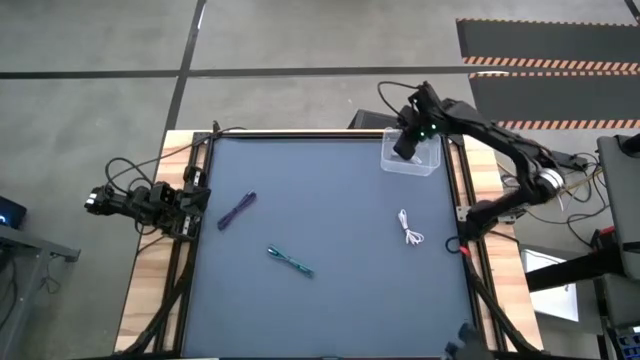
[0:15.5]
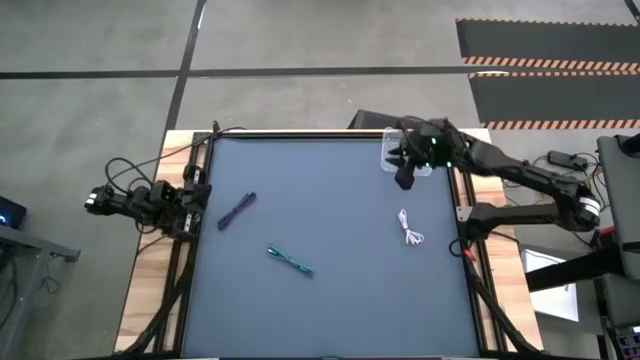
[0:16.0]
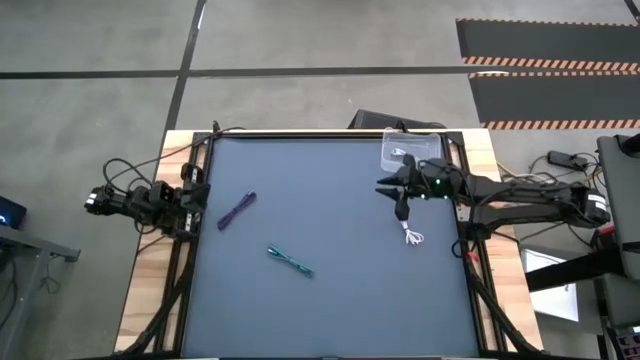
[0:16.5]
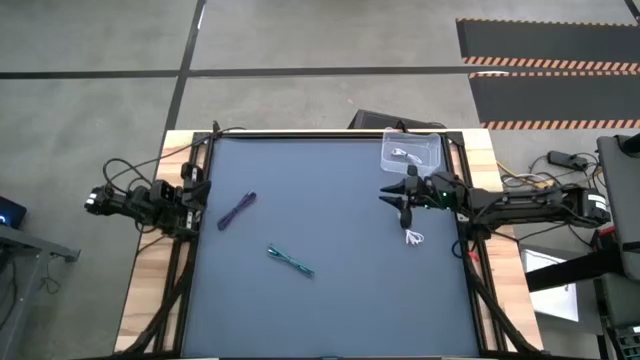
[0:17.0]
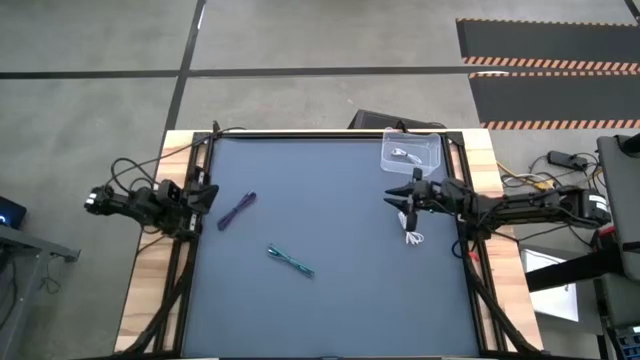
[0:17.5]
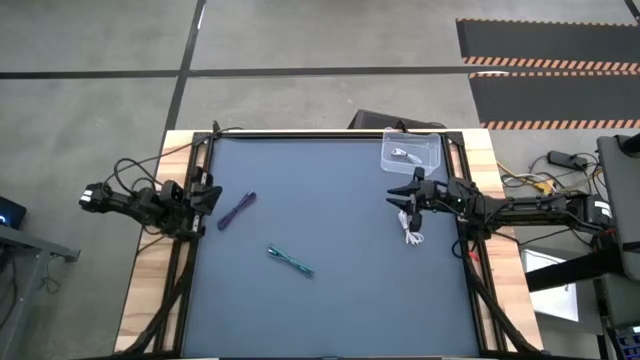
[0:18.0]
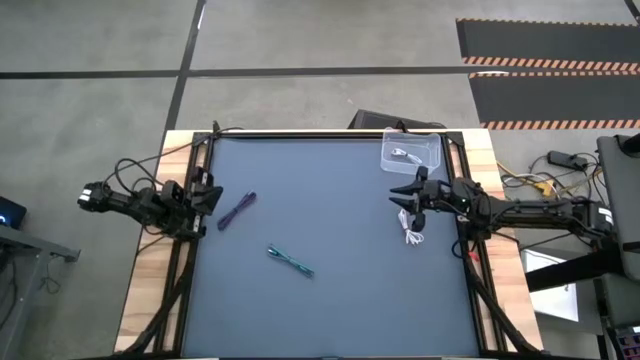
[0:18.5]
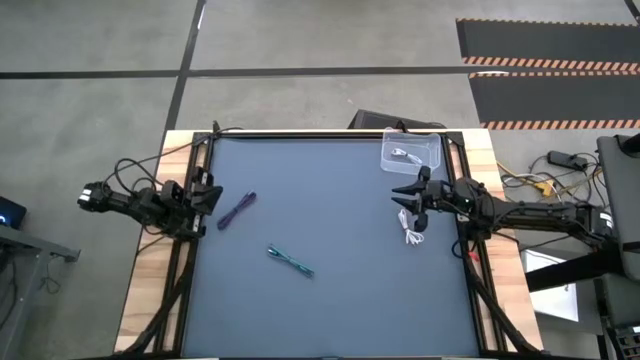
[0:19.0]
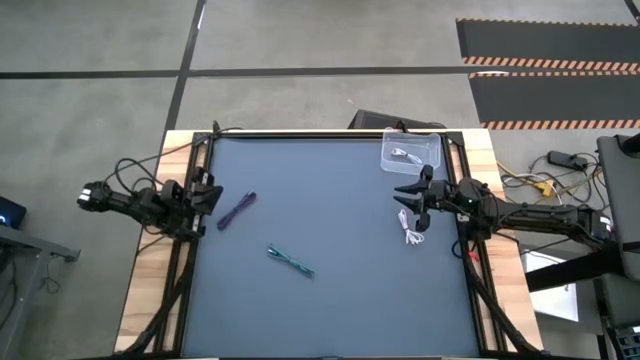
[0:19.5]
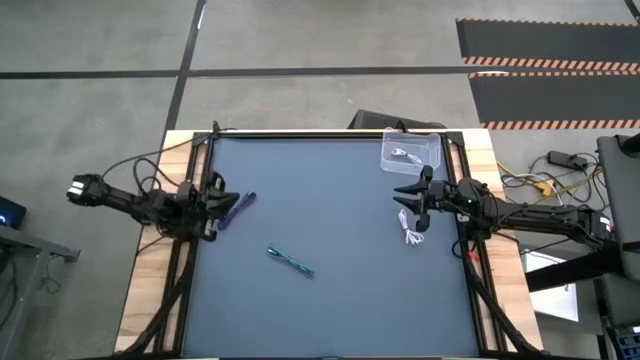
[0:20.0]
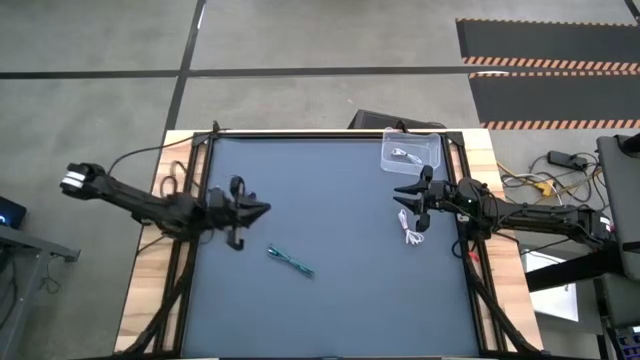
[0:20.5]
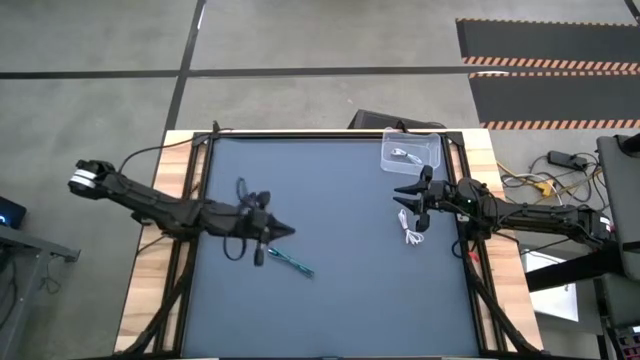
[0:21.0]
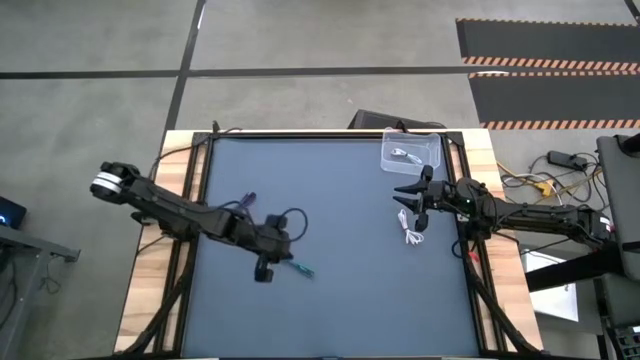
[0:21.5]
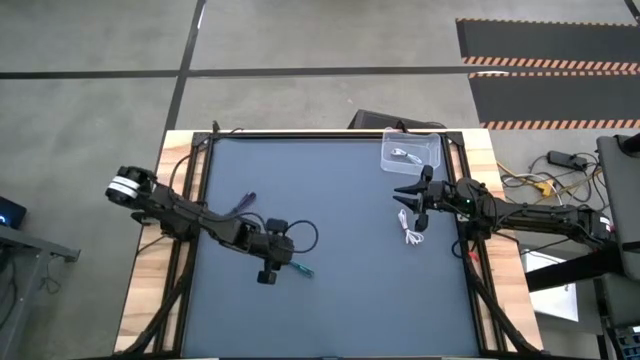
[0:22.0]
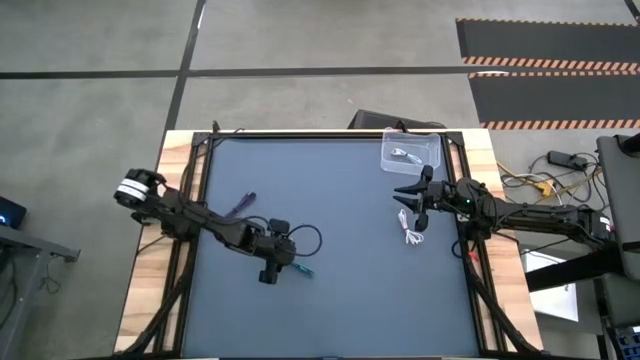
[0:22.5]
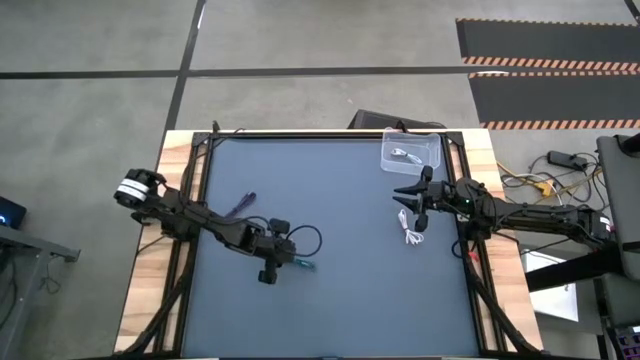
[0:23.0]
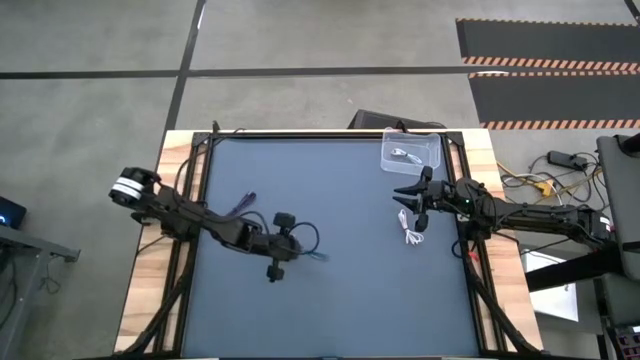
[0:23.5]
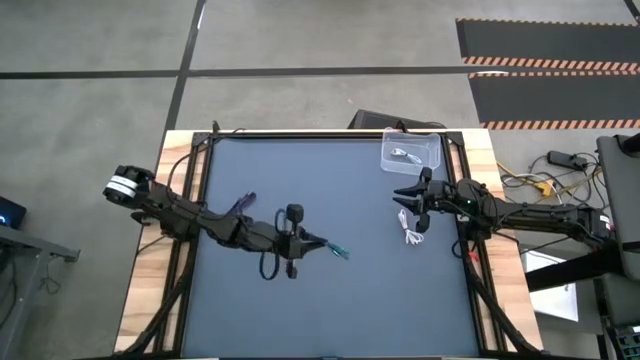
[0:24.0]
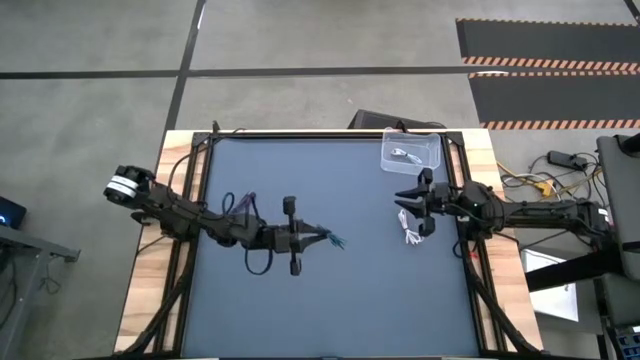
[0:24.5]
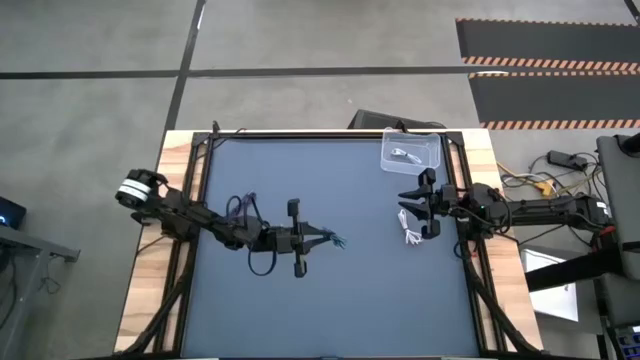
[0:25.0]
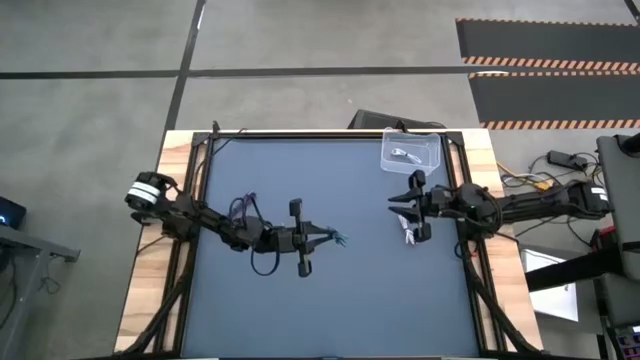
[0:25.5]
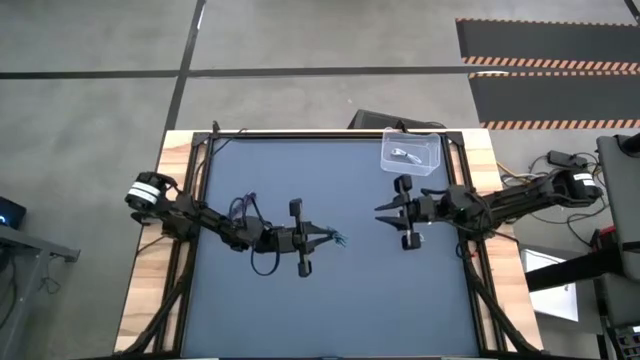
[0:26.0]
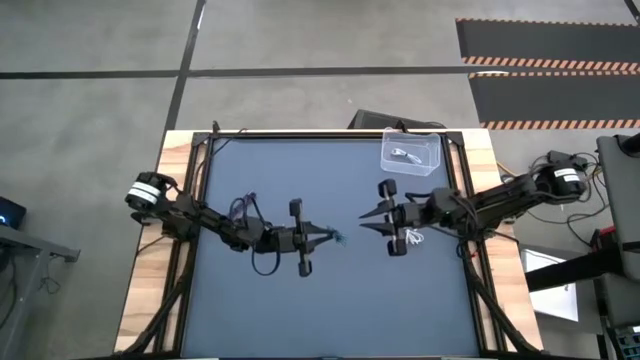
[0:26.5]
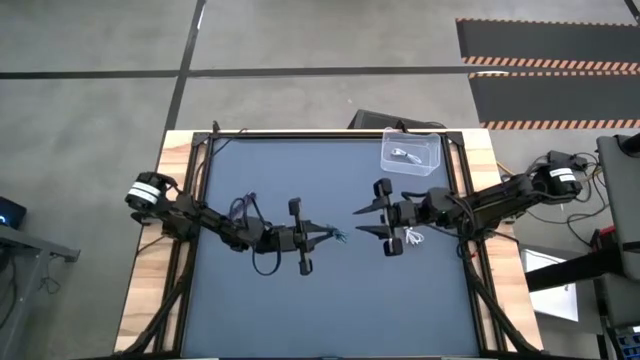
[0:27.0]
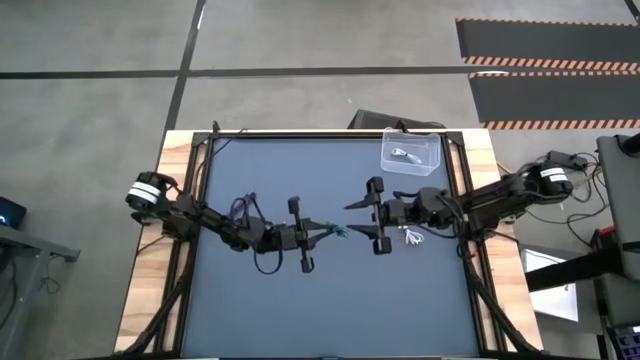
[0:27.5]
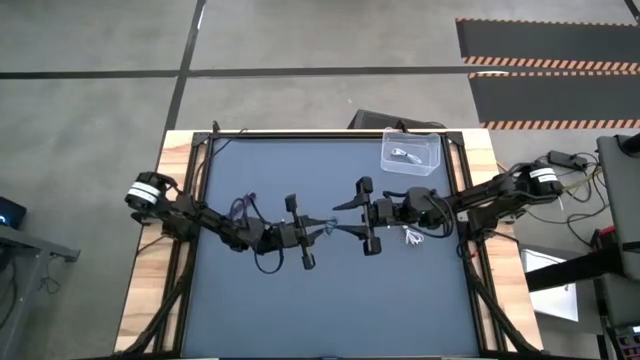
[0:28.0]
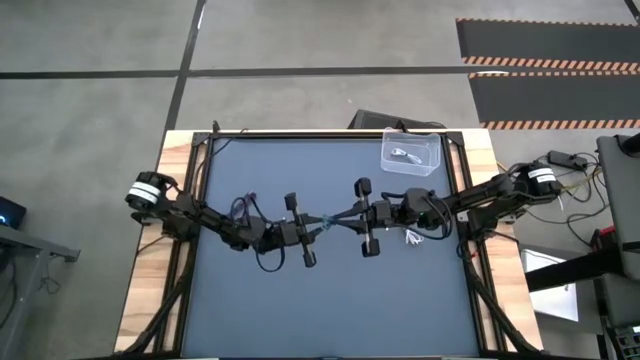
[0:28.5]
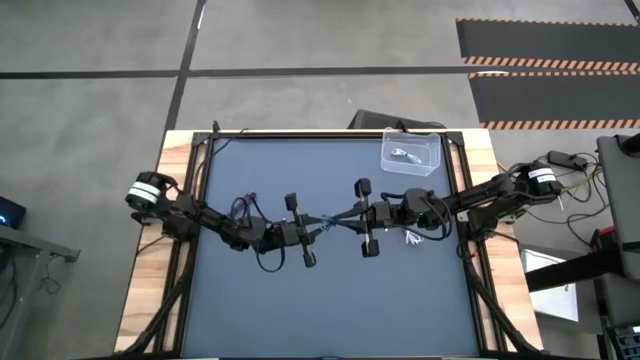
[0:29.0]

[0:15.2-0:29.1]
Task: Pick and place USB-C Cables
Put the blue charger cable into the bin

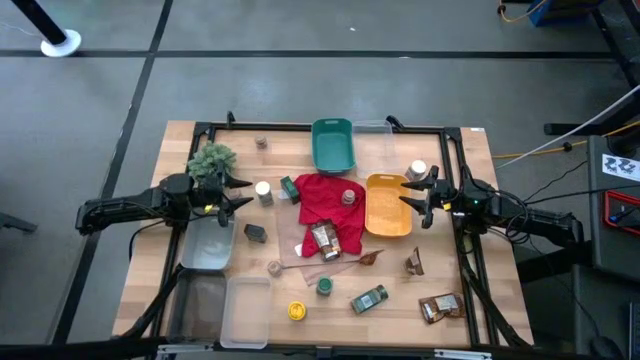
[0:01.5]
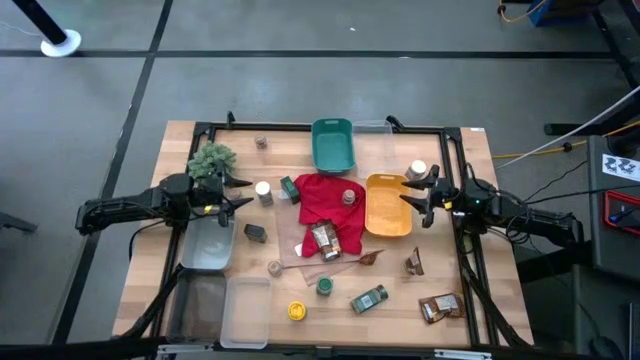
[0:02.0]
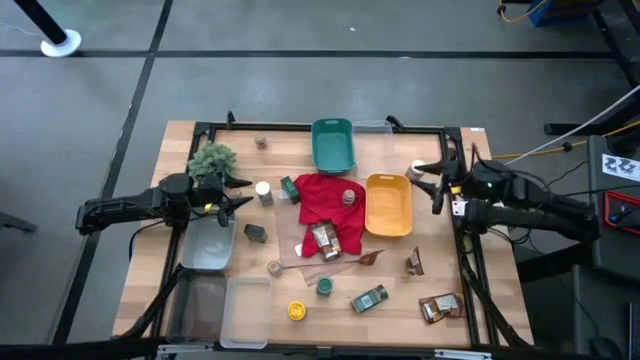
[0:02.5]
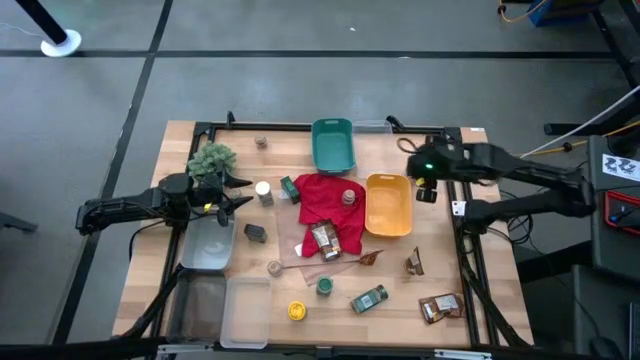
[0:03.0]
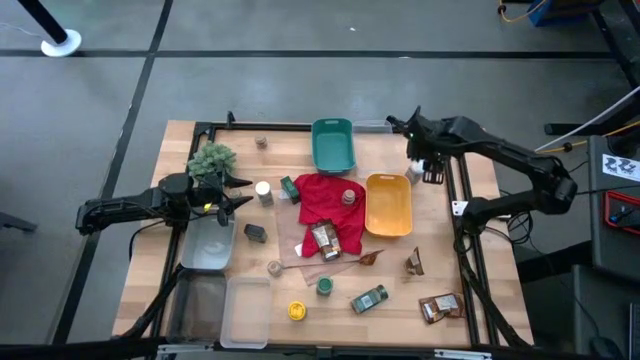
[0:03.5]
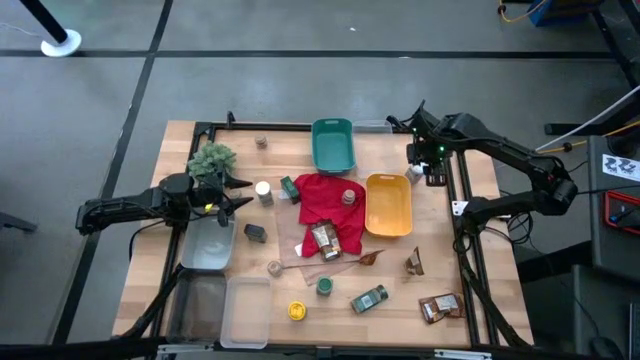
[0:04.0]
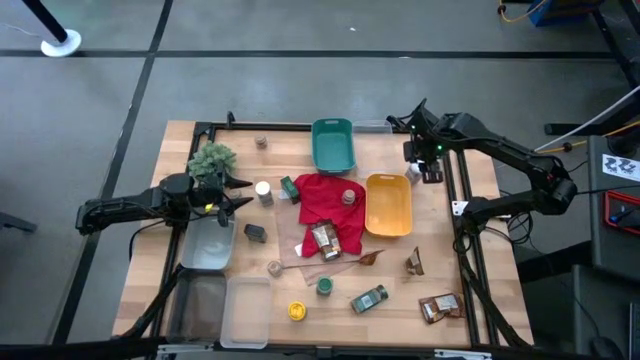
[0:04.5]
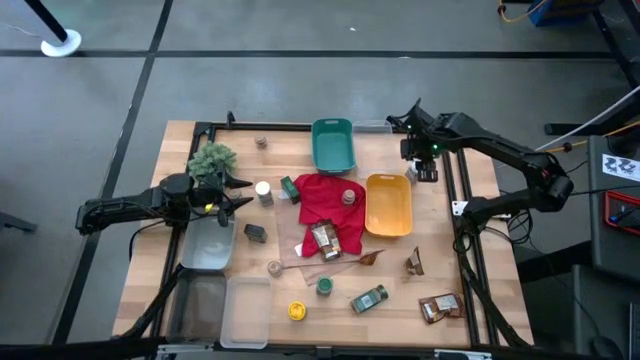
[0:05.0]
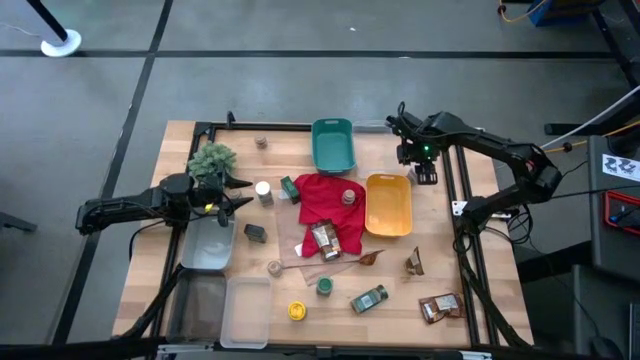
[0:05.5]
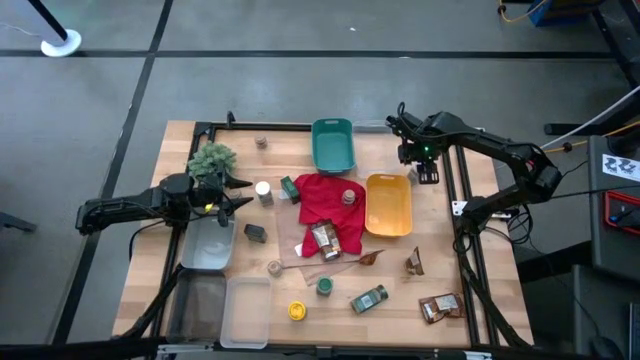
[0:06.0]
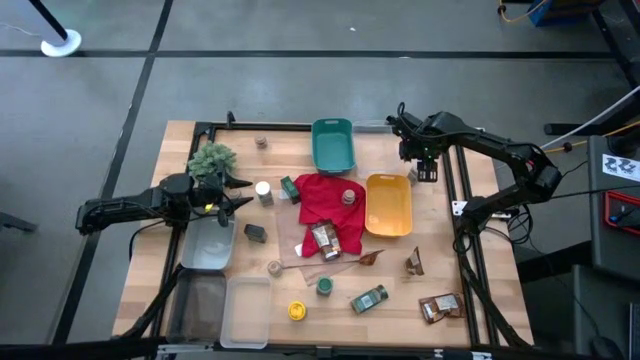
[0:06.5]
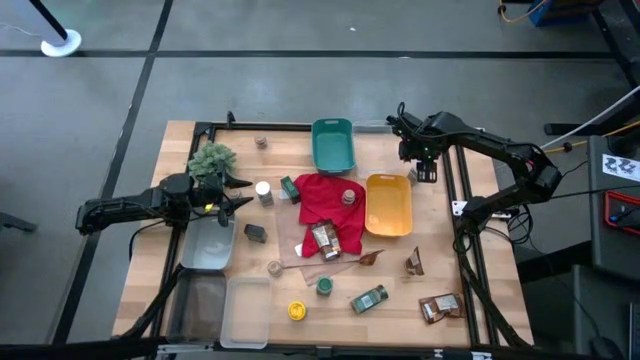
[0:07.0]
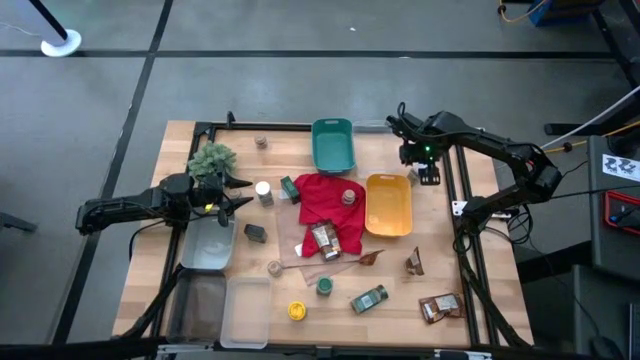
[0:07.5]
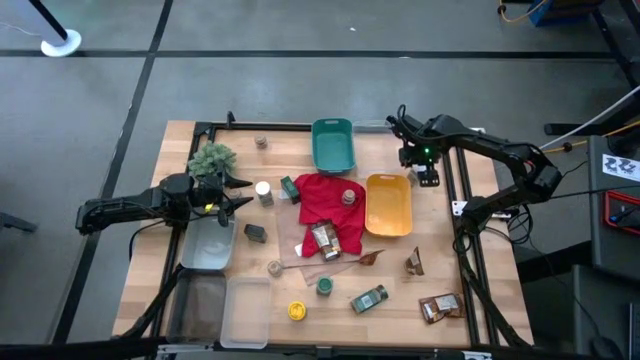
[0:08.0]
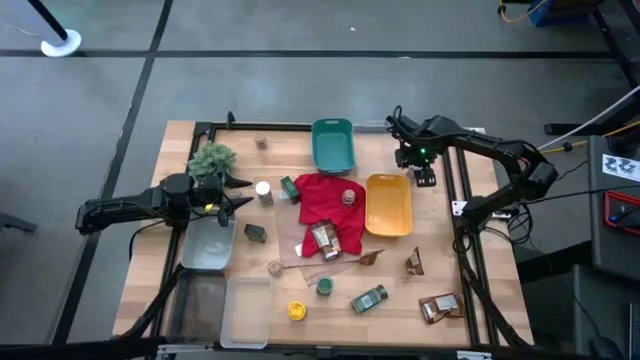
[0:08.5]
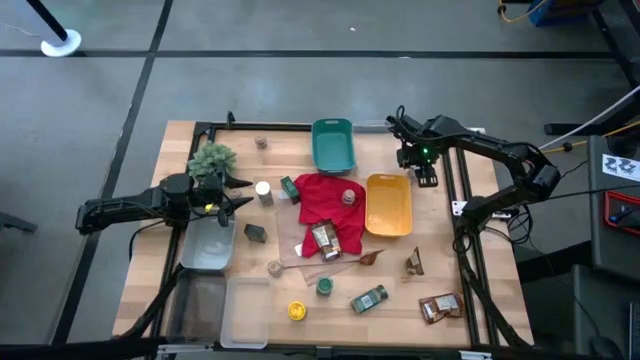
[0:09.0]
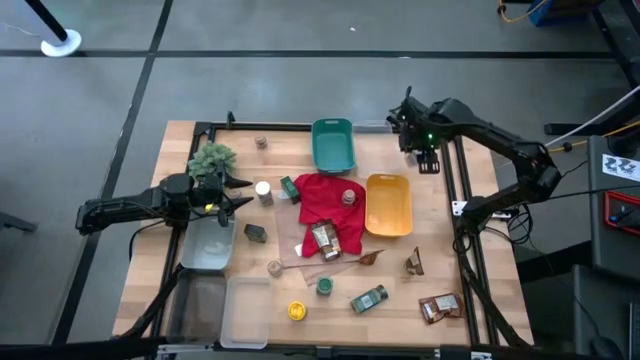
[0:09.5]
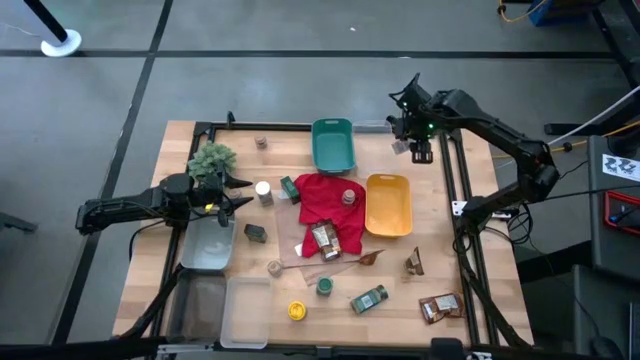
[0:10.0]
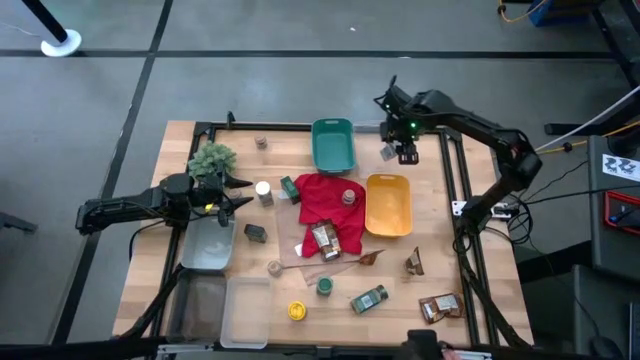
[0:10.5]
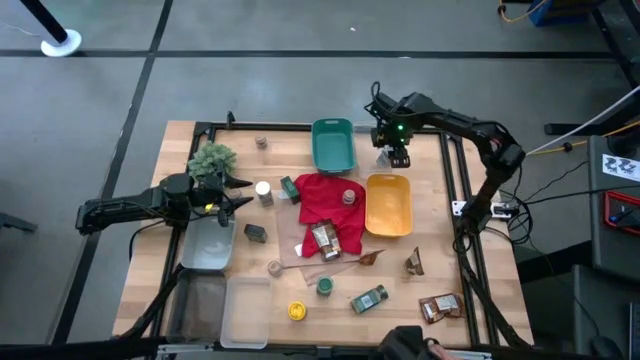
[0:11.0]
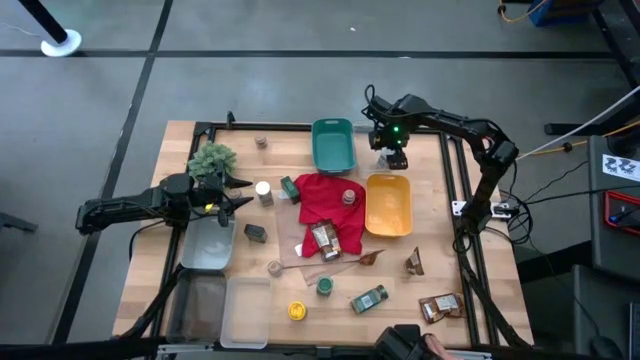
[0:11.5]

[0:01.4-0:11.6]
Task: Sort spices by type
Put the right white seasoning bottle into the top right transparent bin
